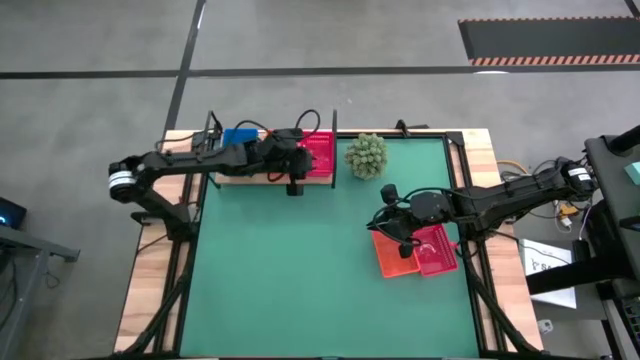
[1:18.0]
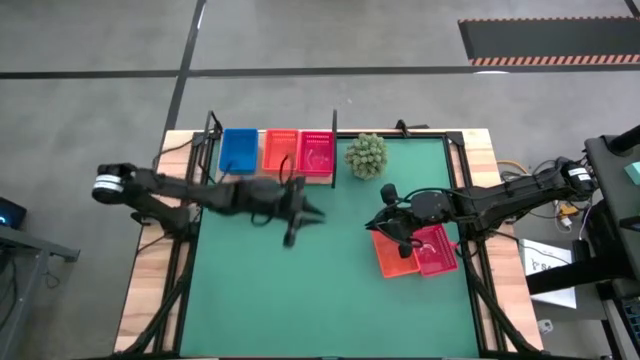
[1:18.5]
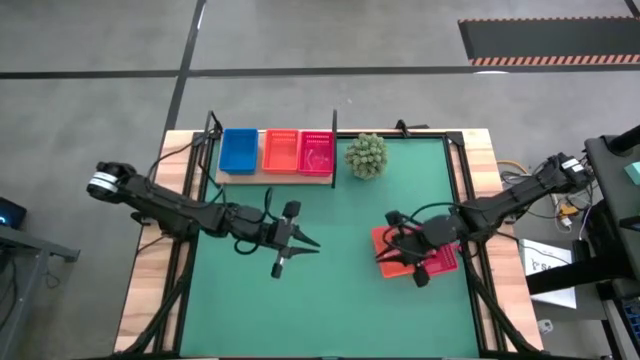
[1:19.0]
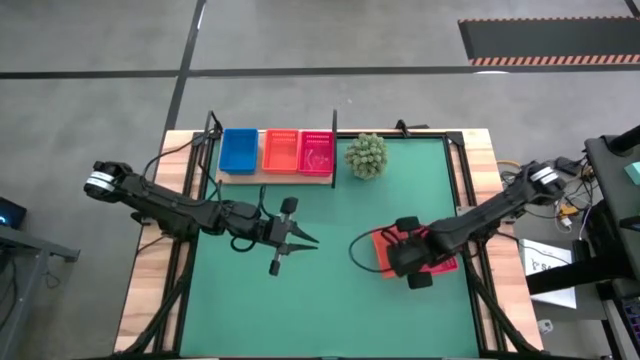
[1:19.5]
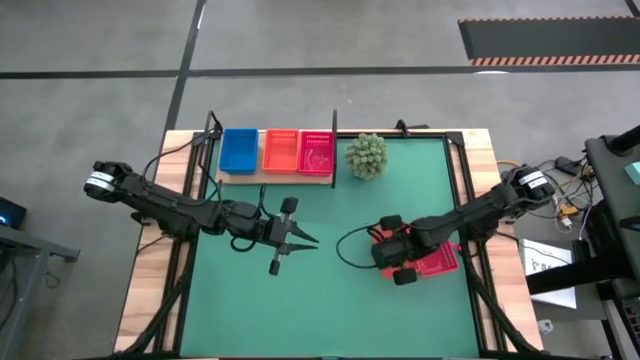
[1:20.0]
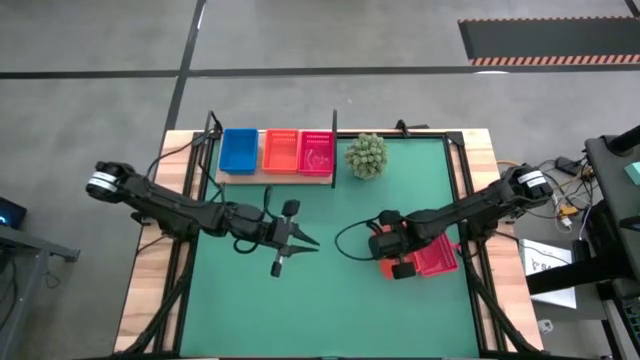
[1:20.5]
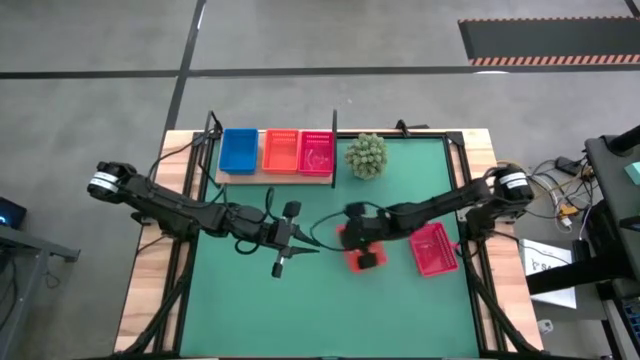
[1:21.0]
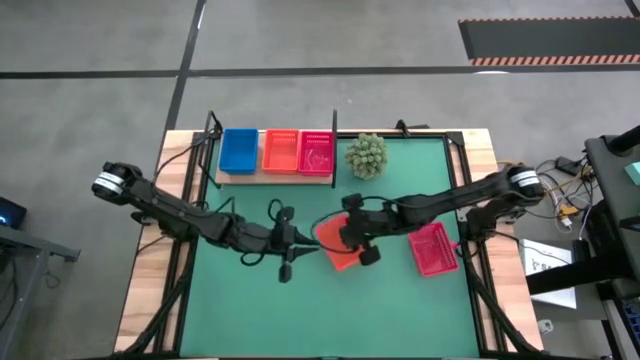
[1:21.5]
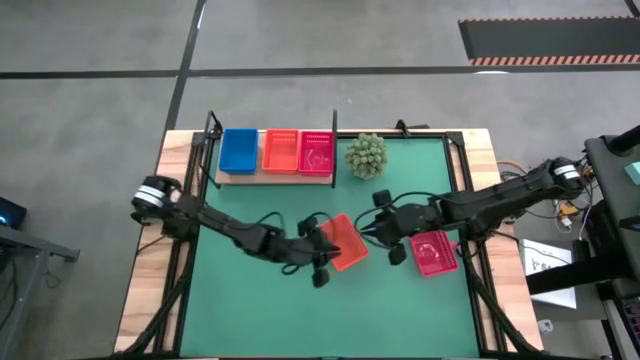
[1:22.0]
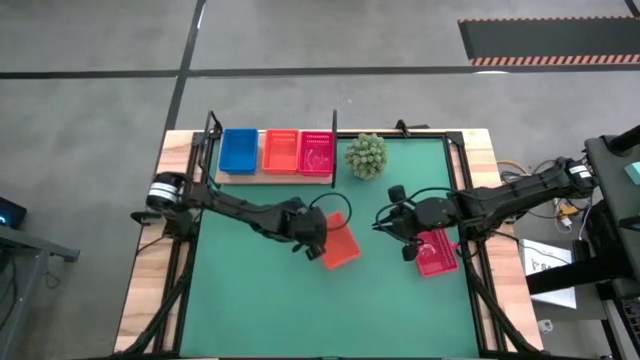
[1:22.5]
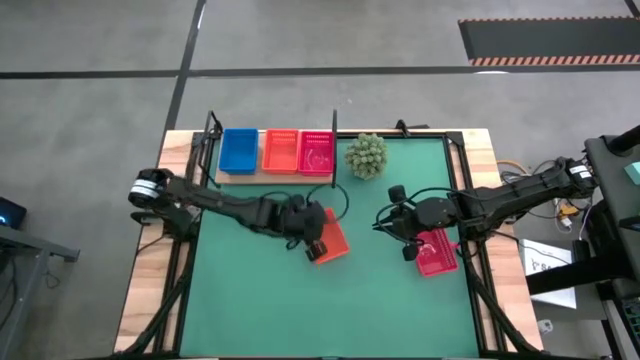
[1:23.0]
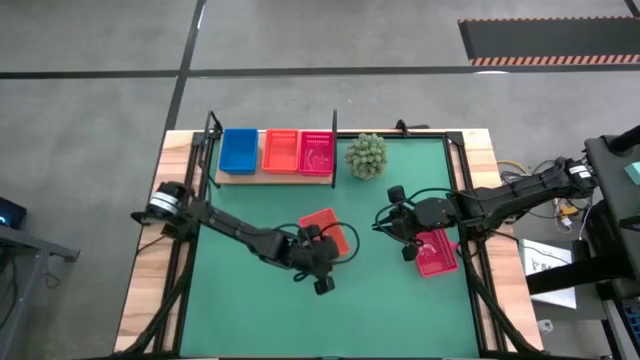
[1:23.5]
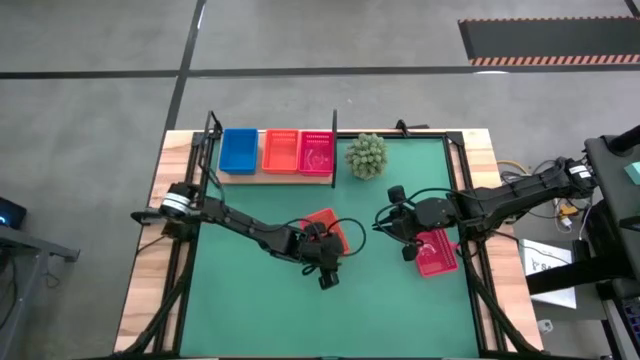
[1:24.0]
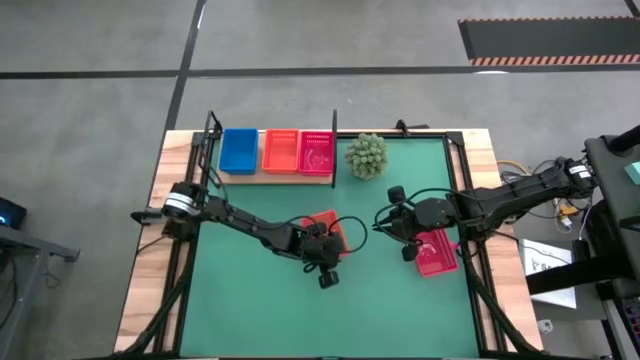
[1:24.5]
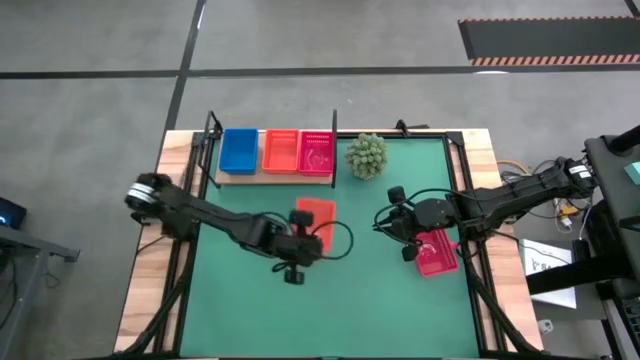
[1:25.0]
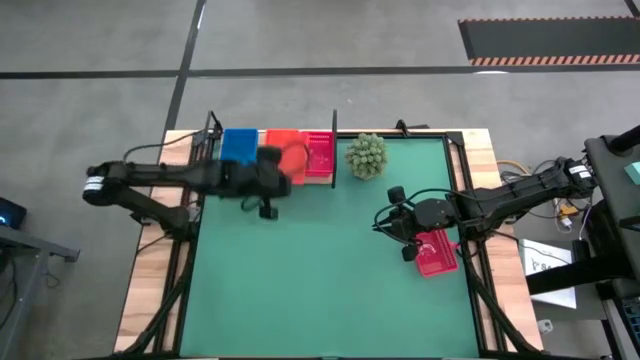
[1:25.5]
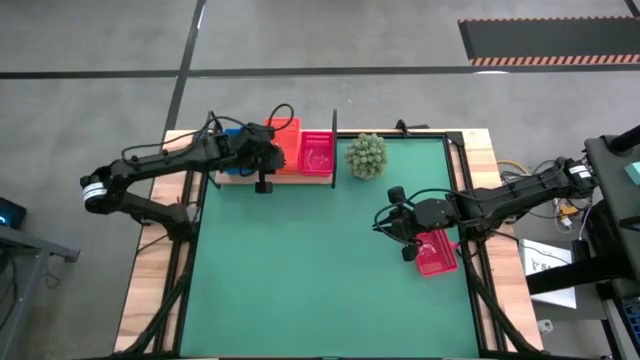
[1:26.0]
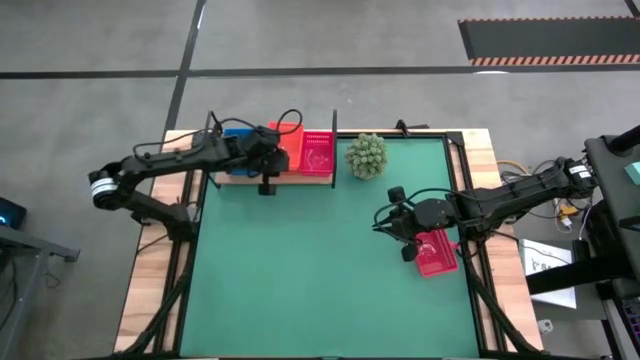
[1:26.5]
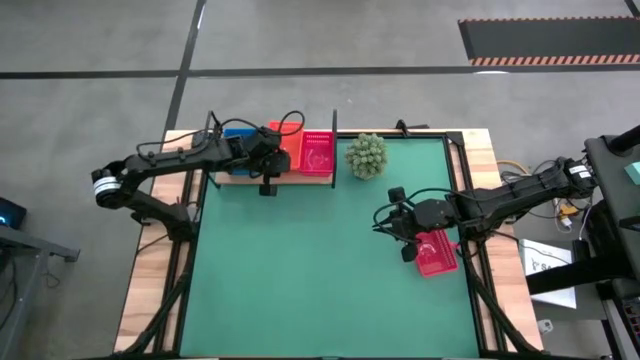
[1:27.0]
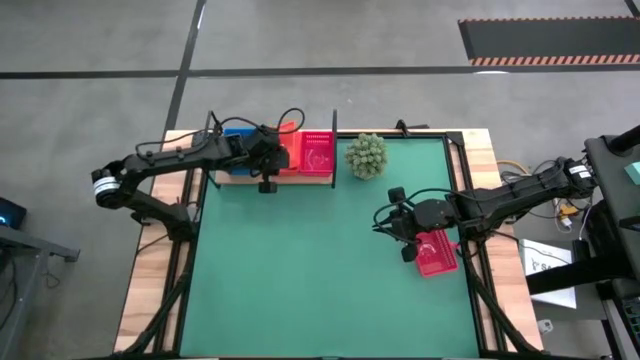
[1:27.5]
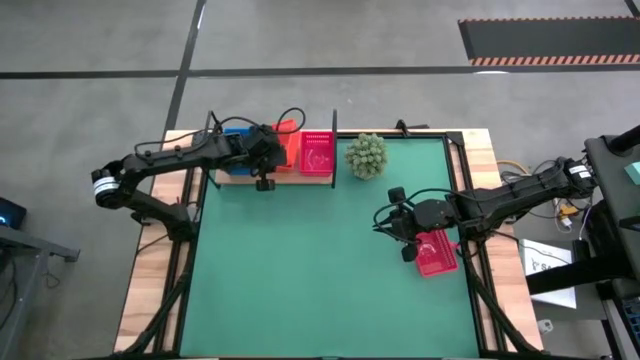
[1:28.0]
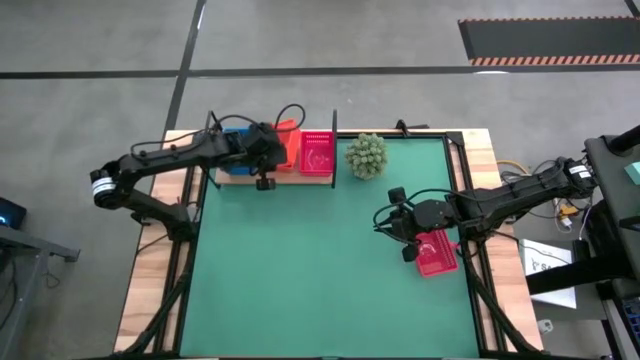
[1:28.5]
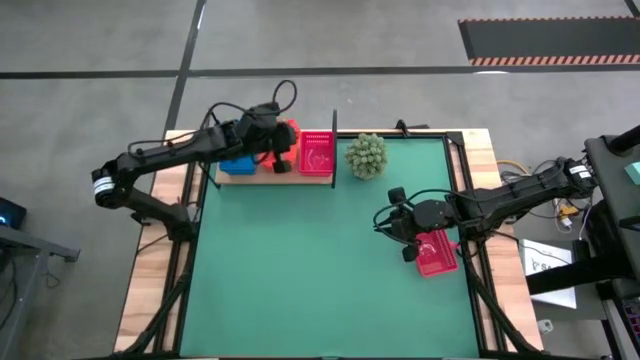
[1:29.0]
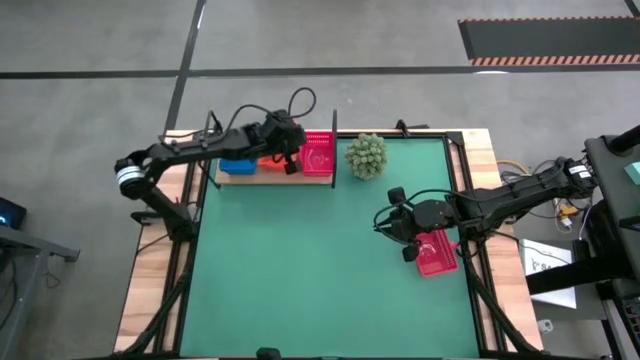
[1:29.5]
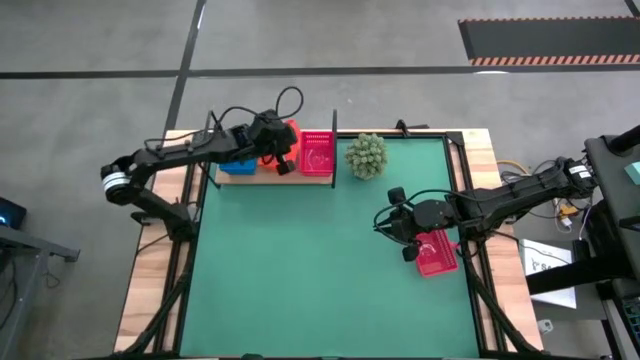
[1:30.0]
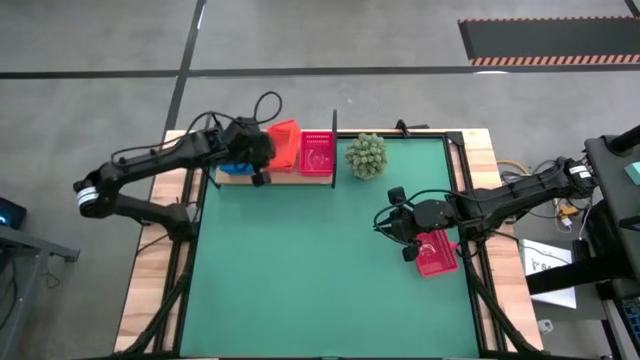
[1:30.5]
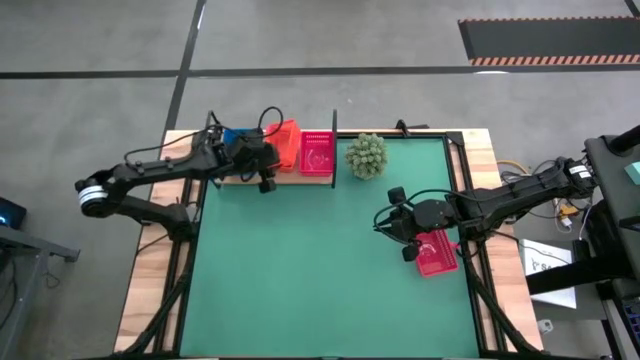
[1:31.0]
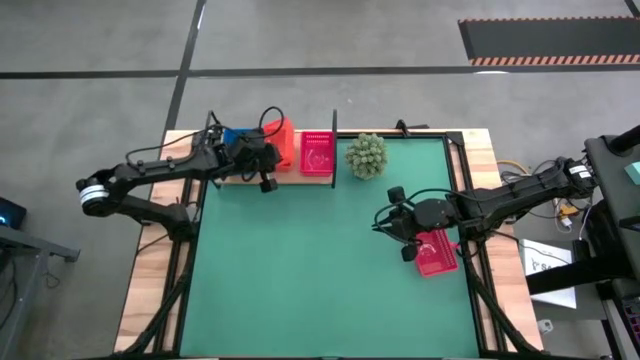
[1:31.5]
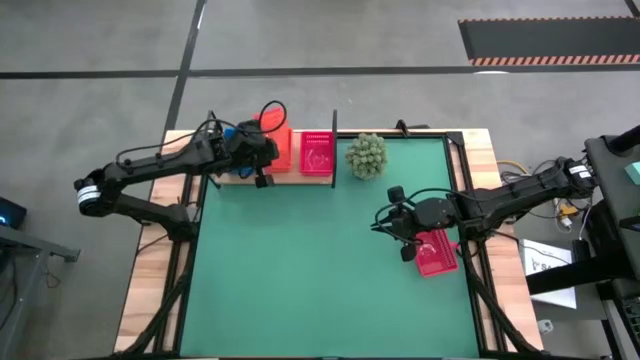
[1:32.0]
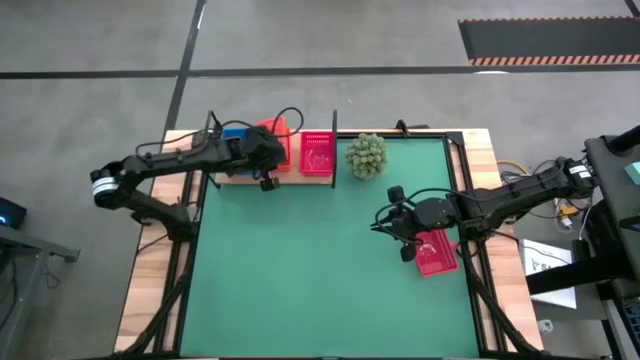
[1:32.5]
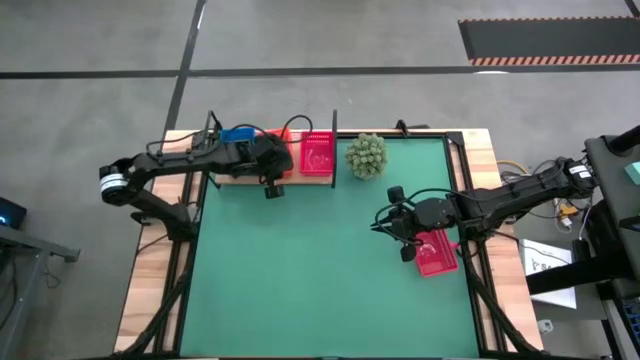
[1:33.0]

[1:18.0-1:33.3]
Task: Stack baskets on shelf by color
Stack the orange bin on the orange bin on the shelf

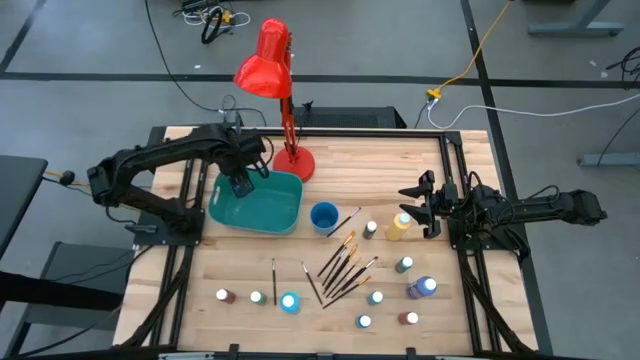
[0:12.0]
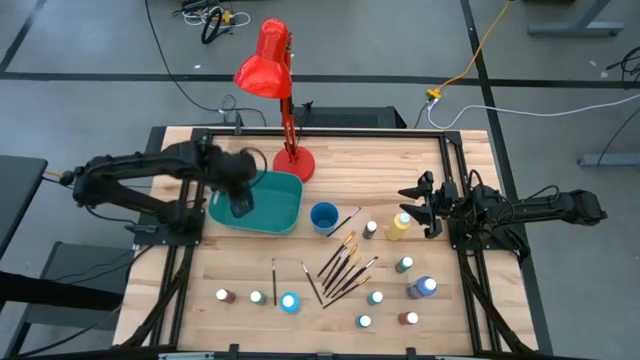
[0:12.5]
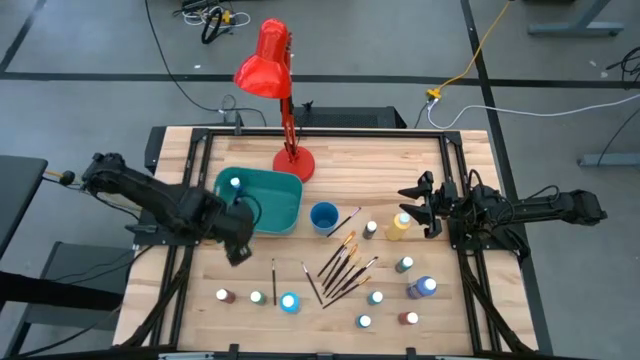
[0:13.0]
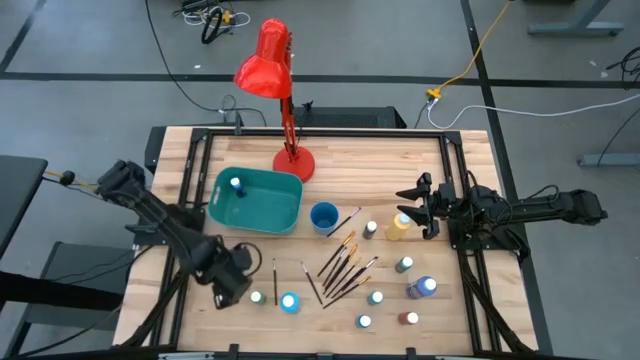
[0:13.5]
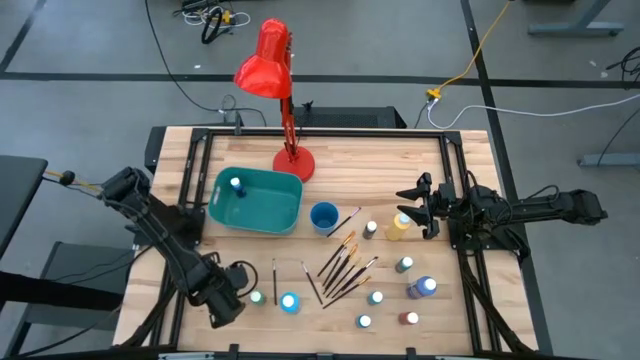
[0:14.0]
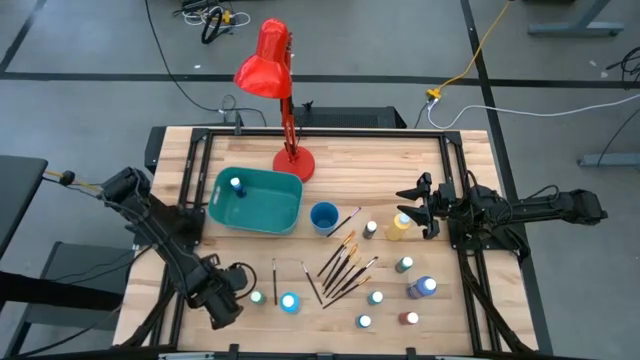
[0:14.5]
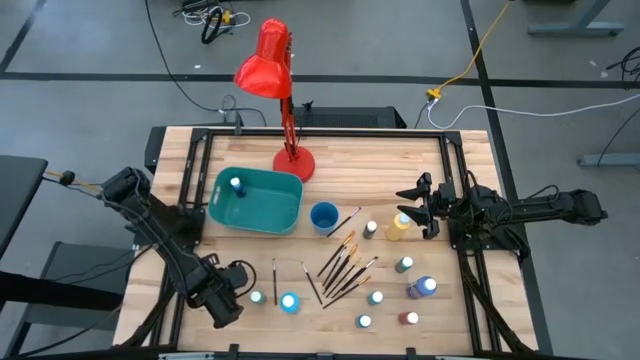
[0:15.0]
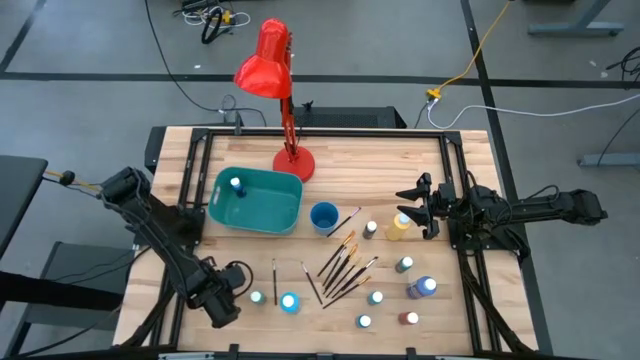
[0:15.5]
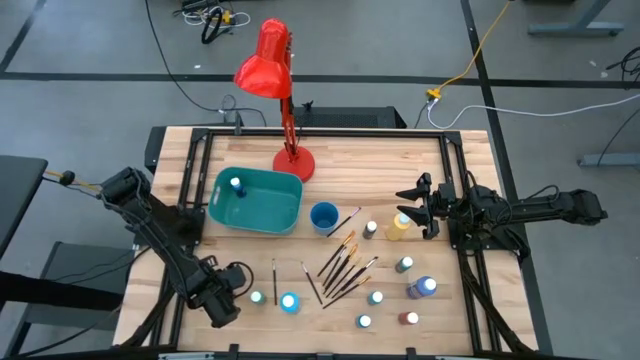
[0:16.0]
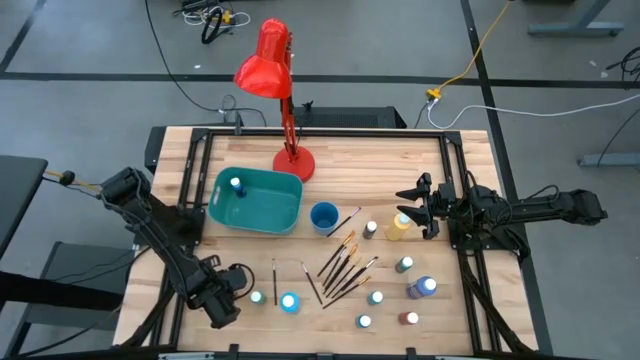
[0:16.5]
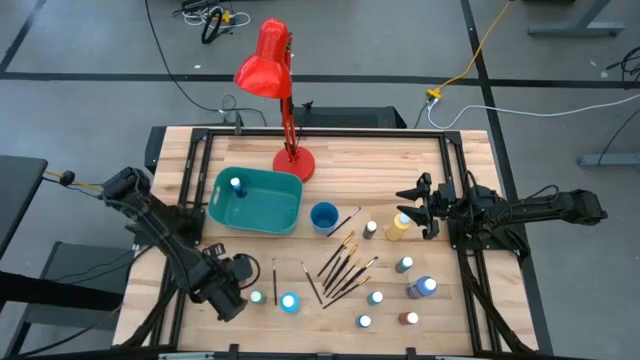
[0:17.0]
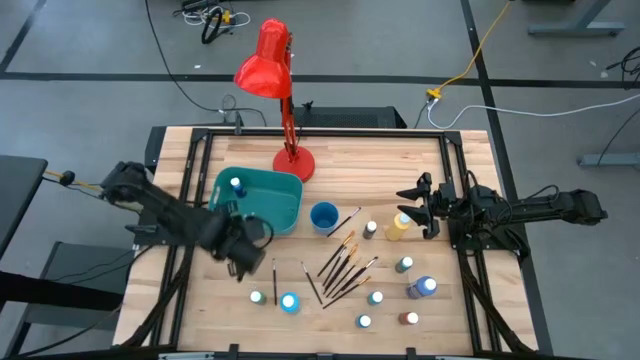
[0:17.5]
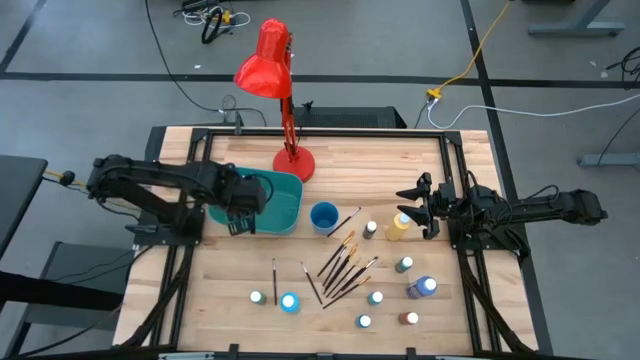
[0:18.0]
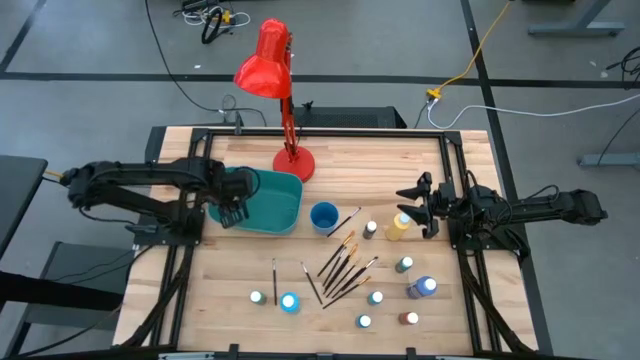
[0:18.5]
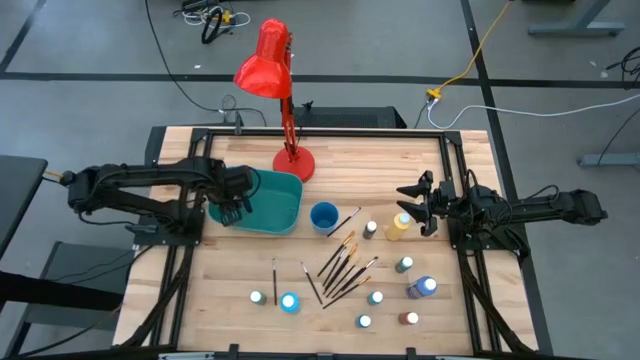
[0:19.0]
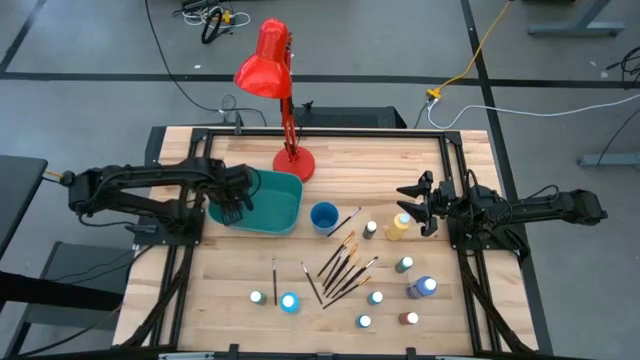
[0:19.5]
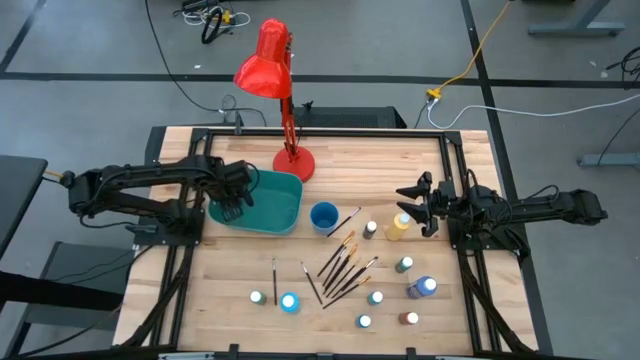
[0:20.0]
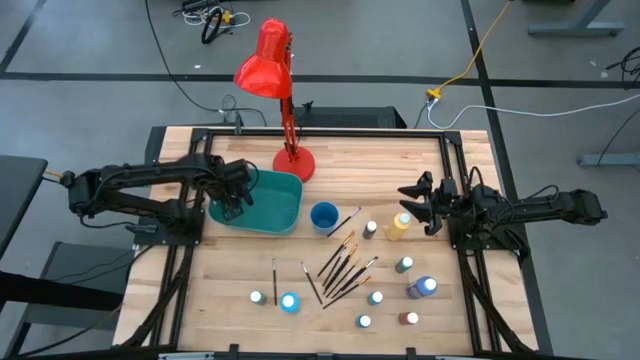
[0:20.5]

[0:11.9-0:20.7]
Task: Pick & Place Paint Supplies
Put the red paint bottle into the green bin
